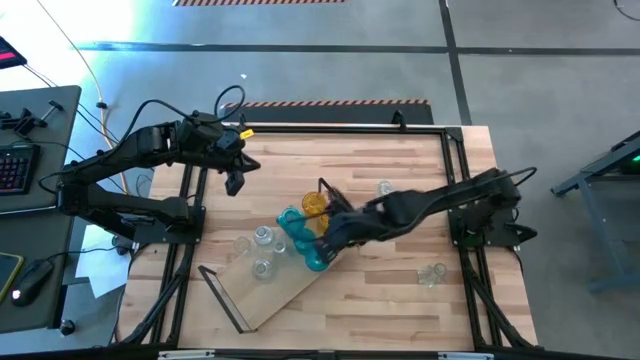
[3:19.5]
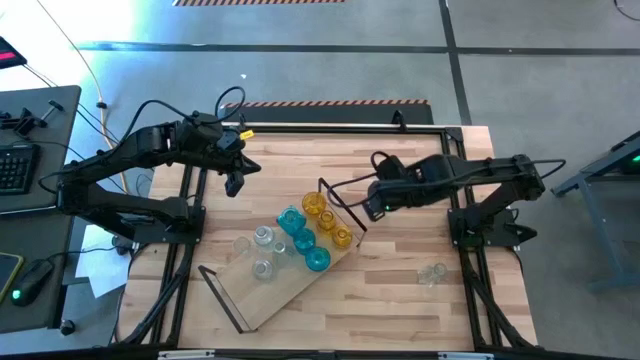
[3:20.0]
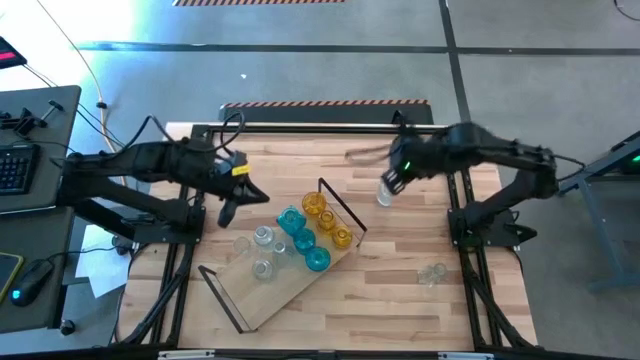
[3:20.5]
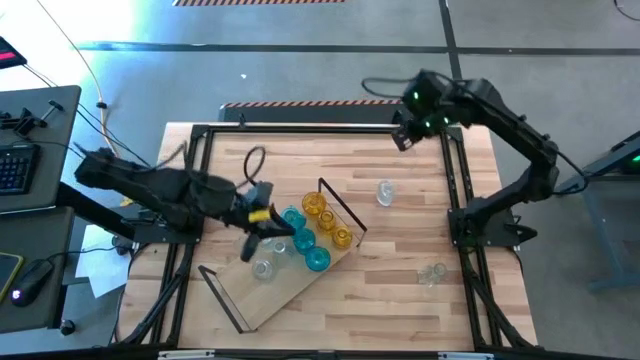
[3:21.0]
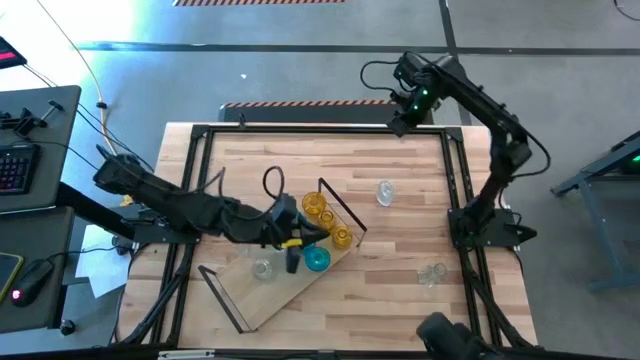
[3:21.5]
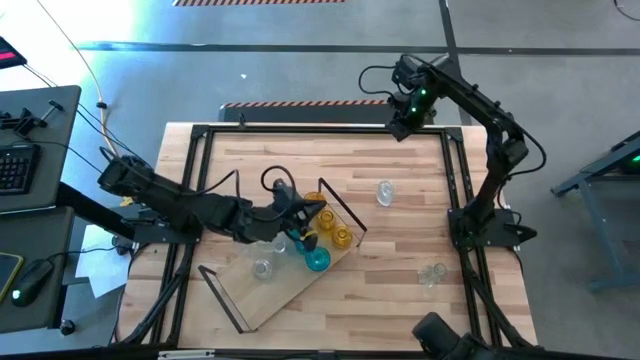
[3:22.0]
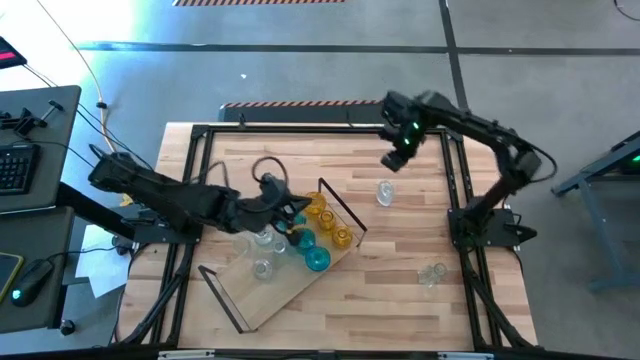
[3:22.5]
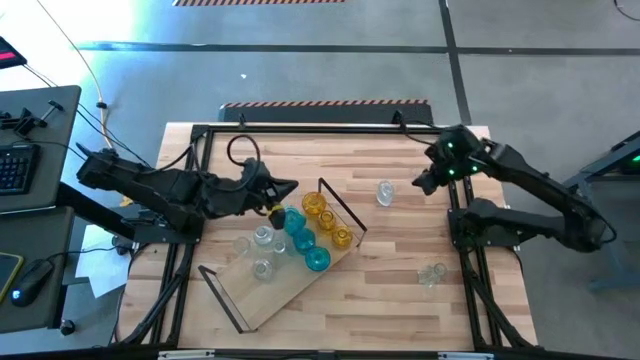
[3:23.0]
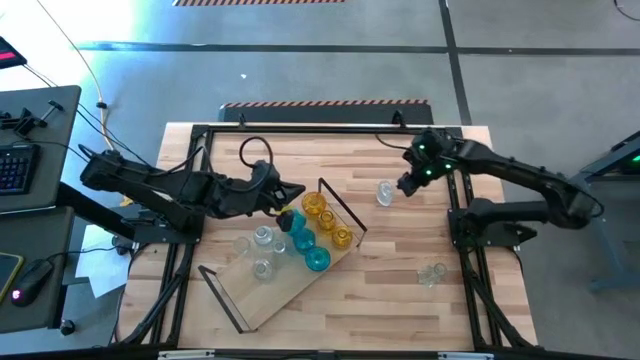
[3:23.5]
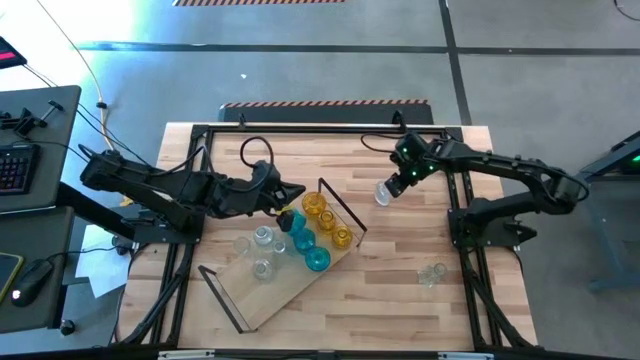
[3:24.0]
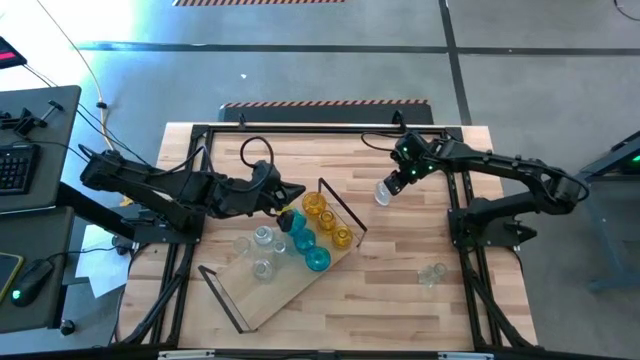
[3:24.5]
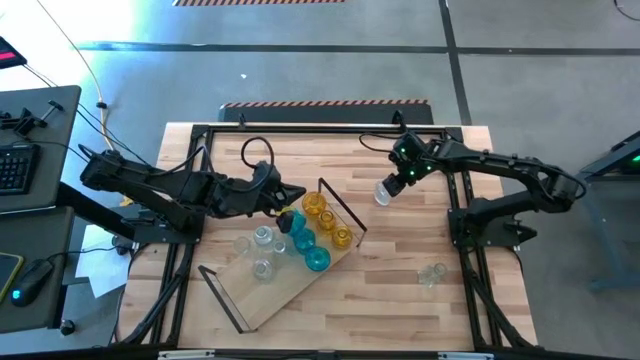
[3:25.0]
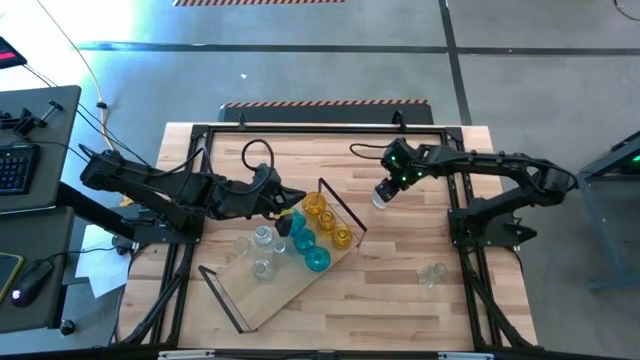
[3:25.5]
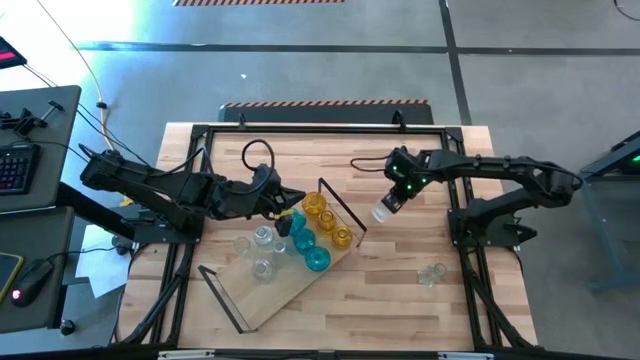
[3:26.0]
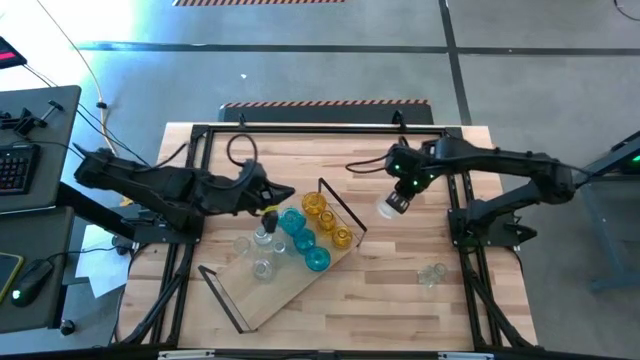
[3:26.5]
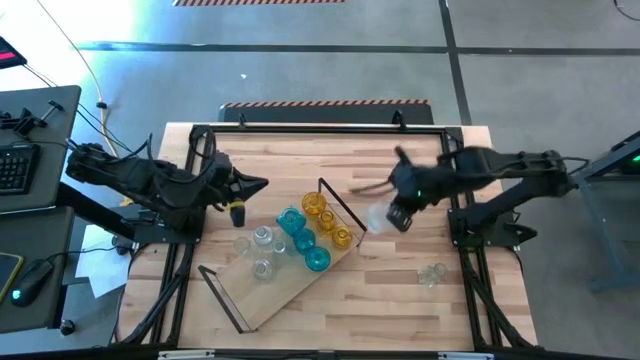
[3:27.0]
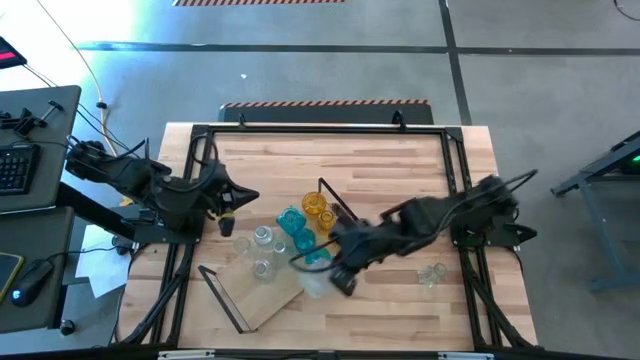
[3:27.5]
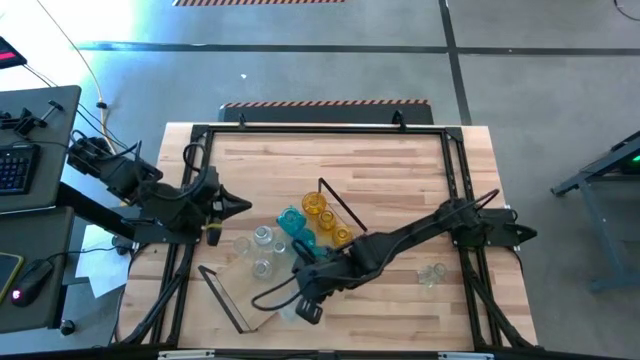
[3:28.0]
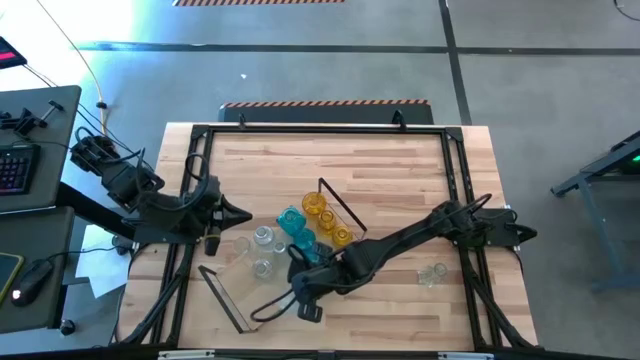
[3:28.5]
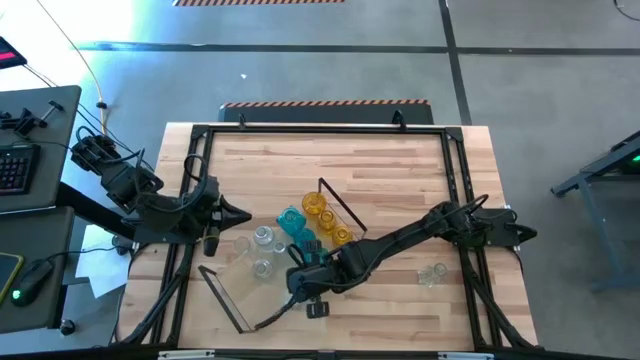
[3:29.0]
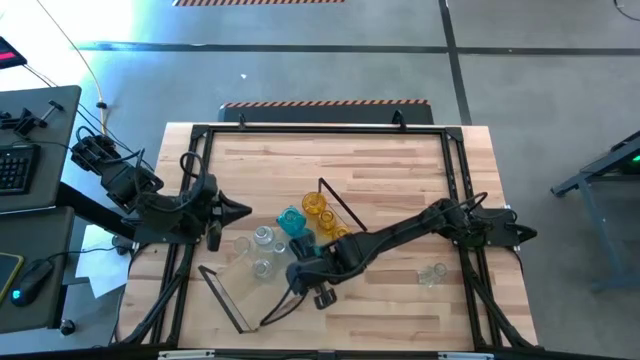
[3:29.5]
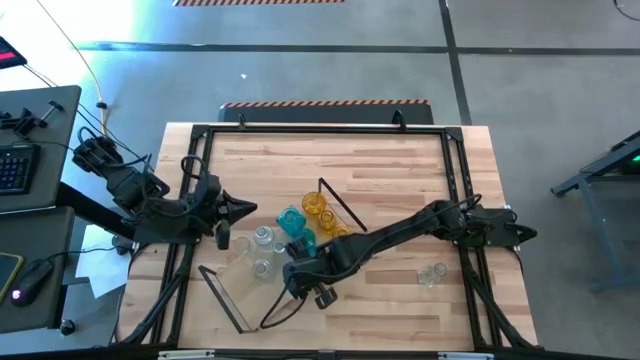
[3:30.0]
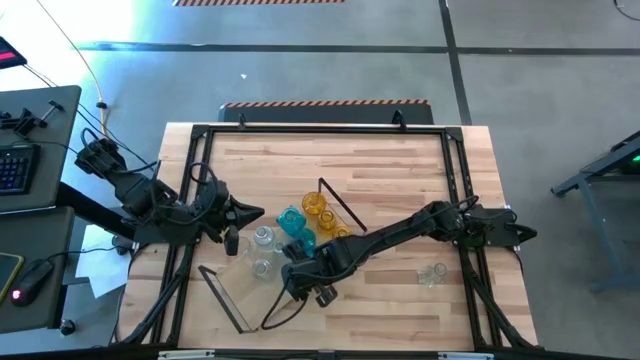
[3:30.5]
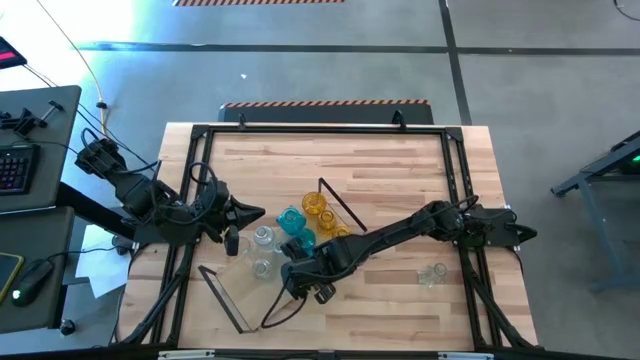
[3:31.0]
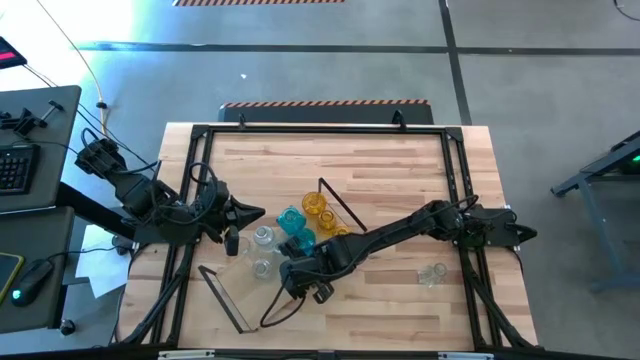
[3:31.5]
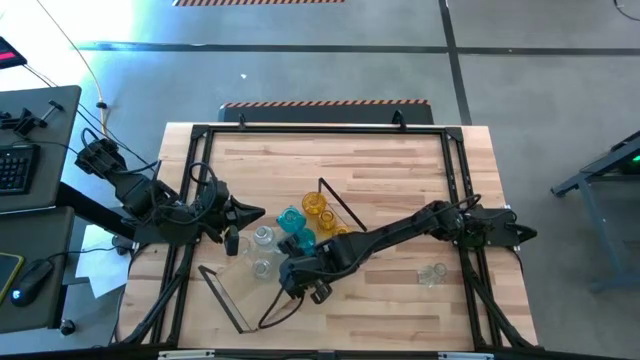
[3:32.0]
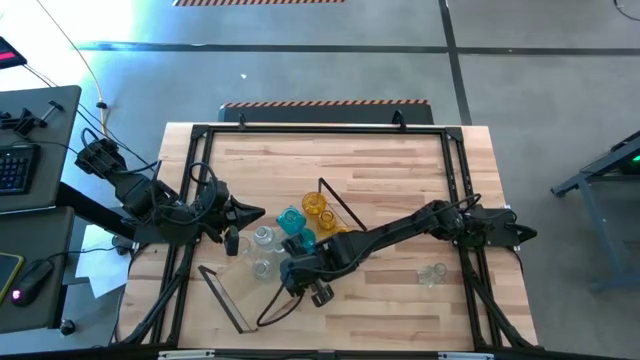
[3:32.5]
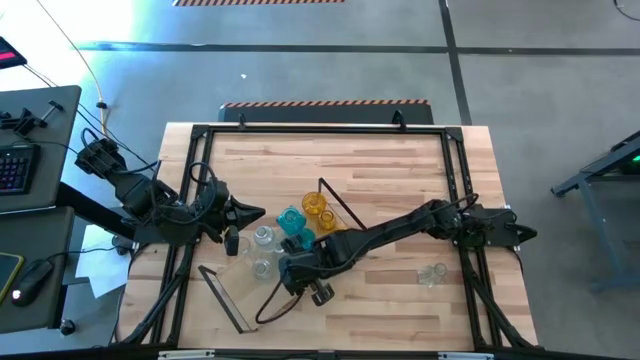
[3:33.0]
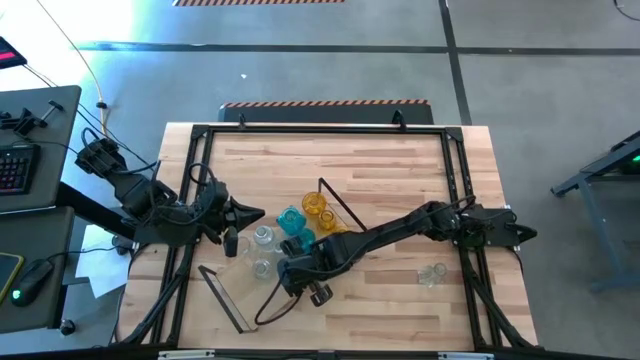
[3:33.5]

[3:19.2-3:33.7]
Task: sort vases onto shelf
Put the transparent vase on the shelf aligned with the other transparent vases

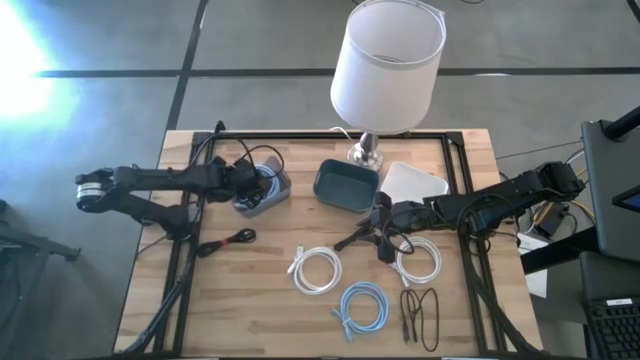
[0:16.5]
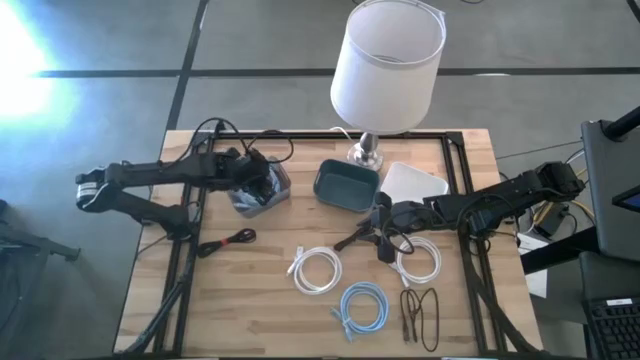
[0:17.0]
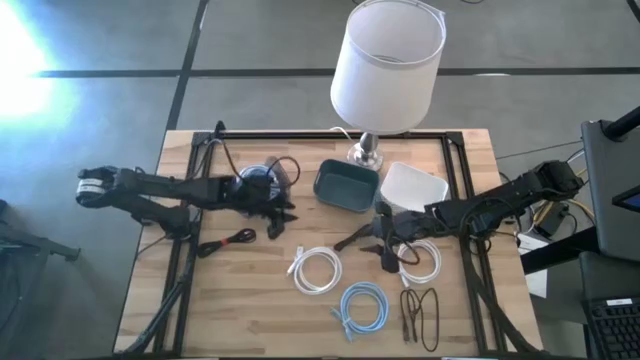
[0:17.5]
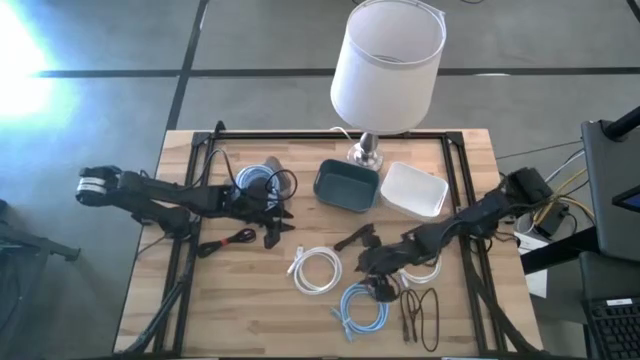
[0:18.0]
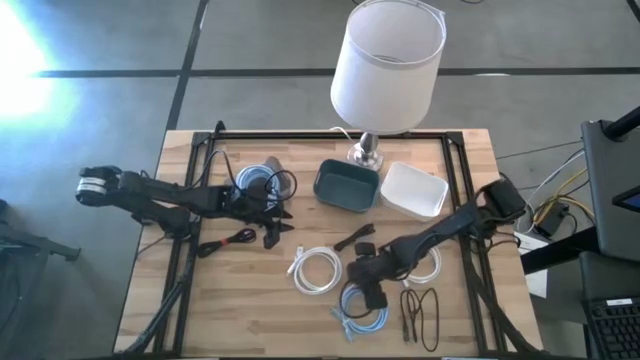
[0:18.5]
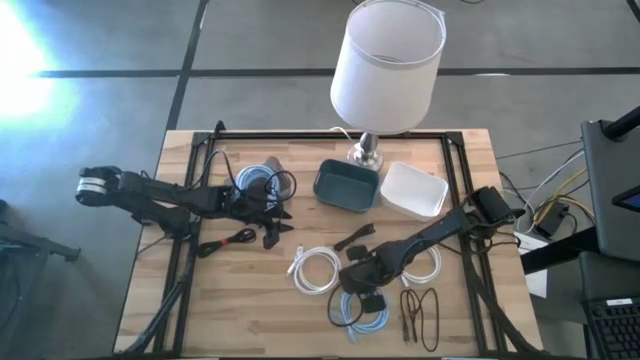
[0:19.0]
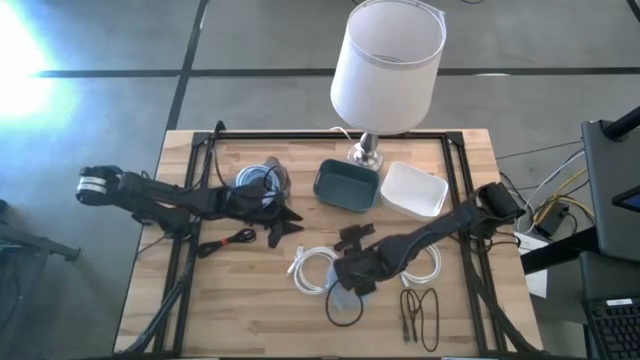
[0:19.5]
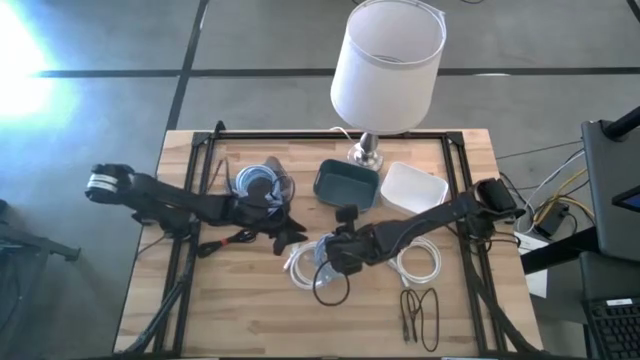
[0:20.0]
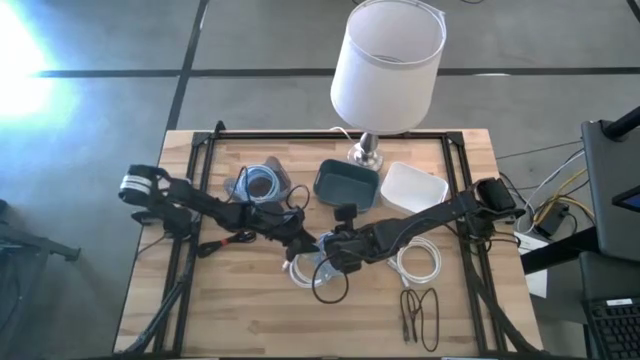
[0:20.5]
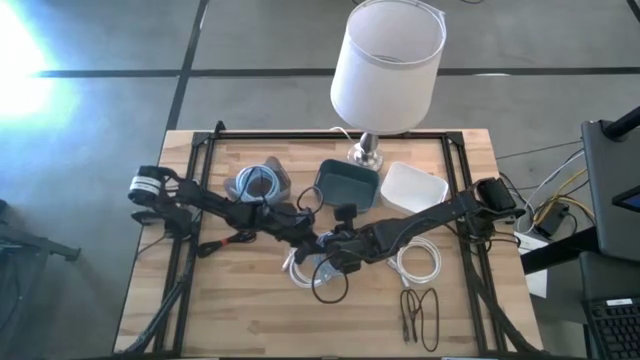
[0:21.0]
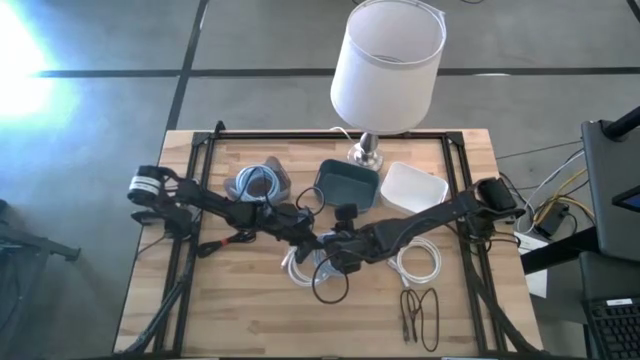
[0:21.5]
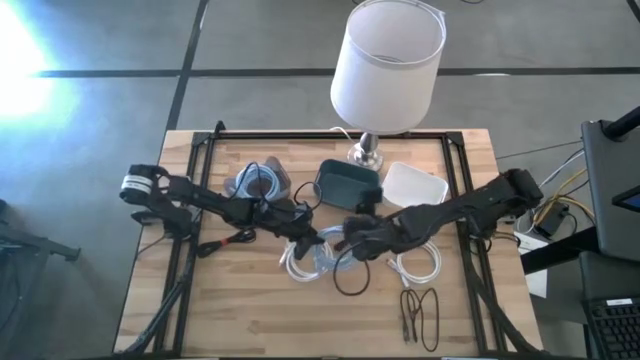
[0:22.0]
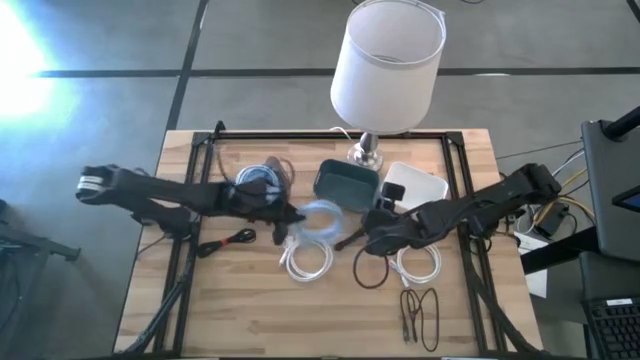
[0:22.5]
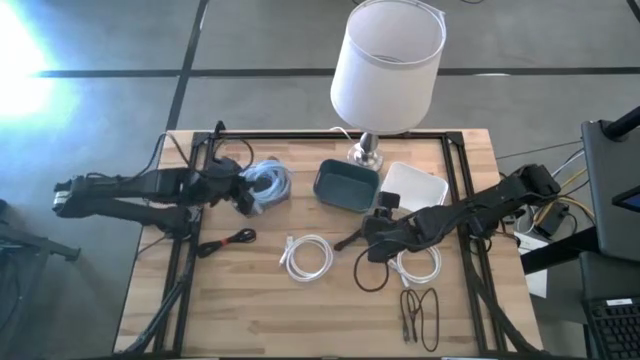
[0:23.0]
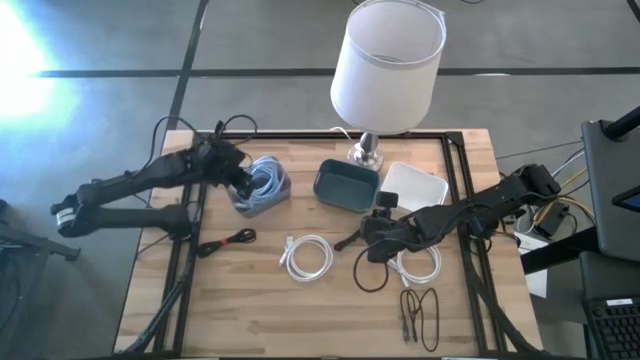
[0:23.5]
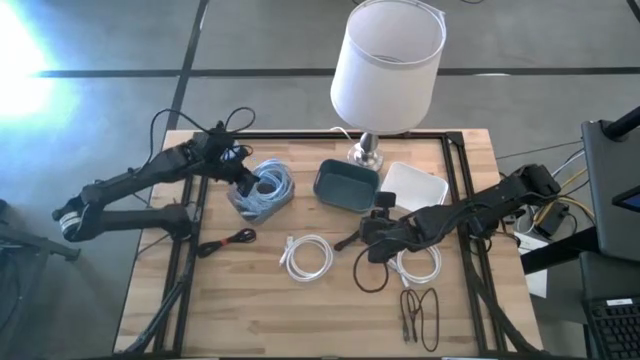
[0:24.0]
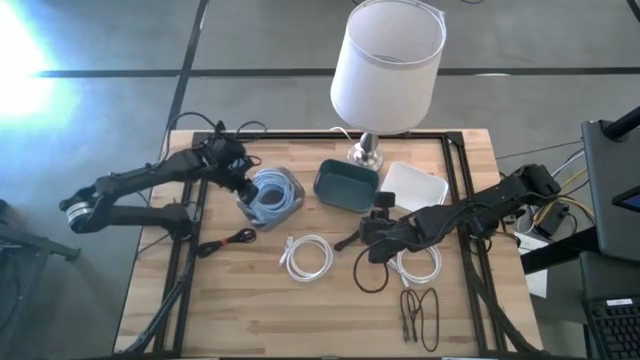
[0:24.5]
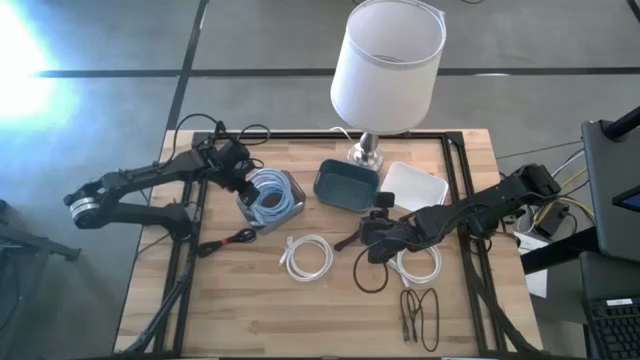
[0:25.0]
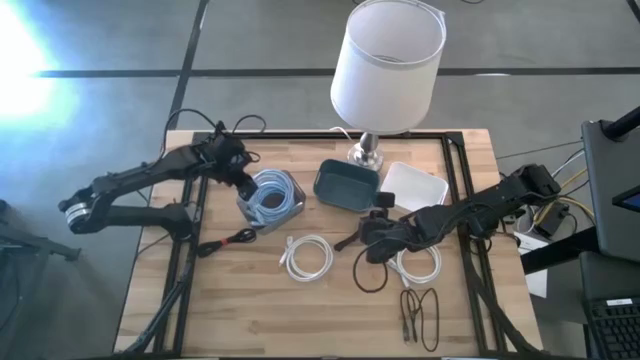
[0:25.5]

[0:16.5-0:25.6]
Task: Pick & Place USB Port
Put the blue HDMI cable into the black bin
